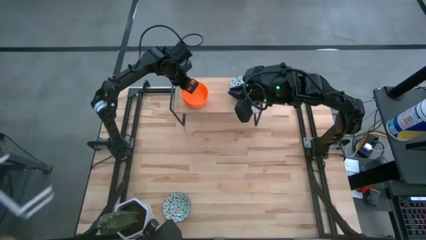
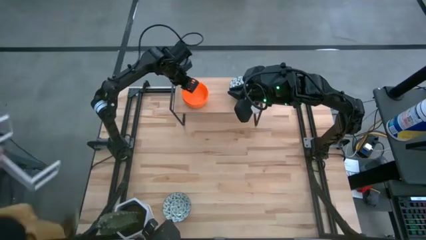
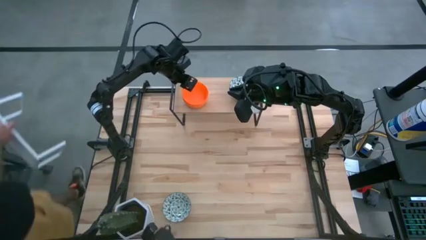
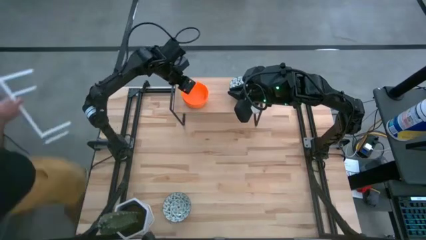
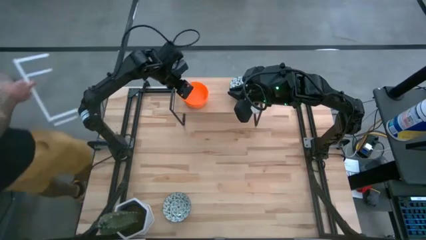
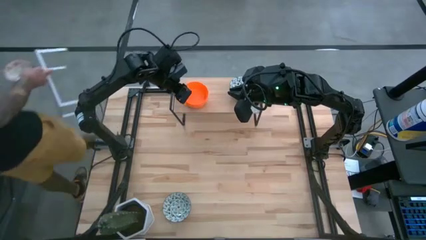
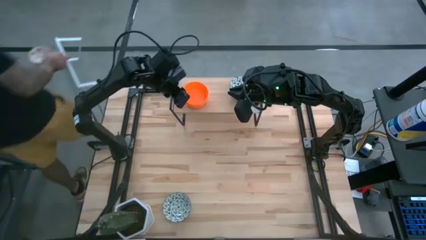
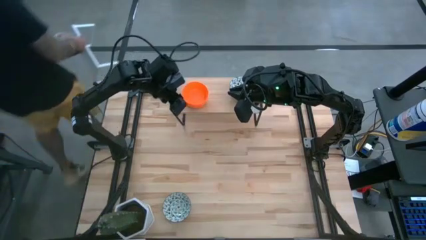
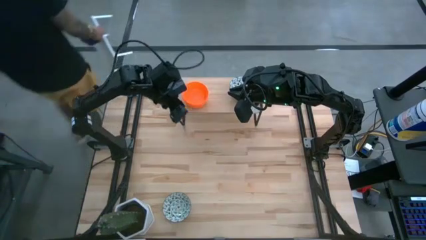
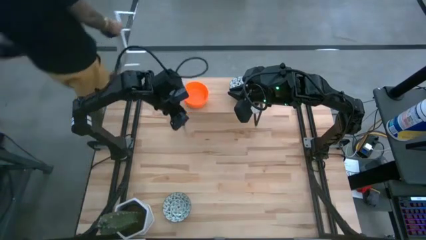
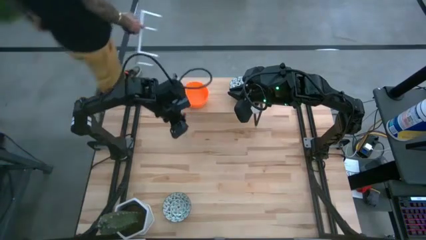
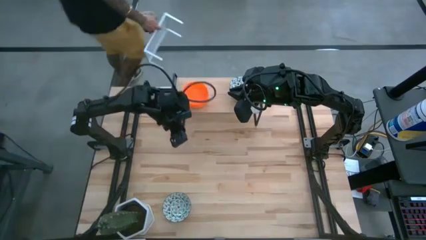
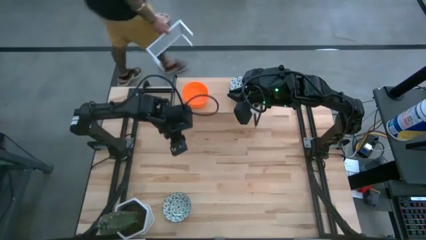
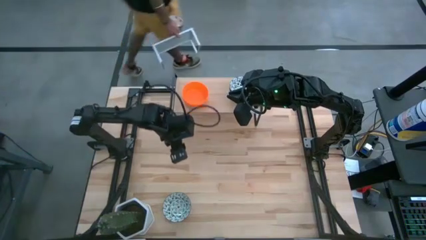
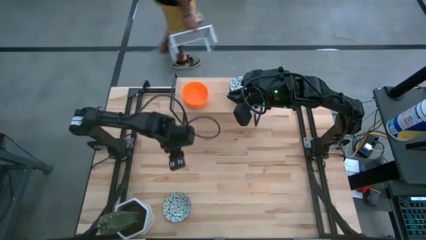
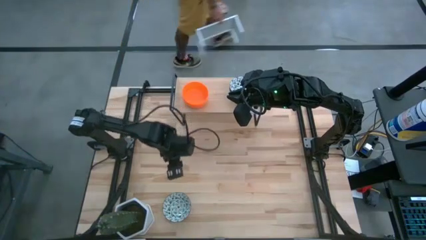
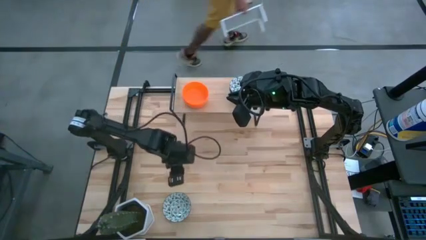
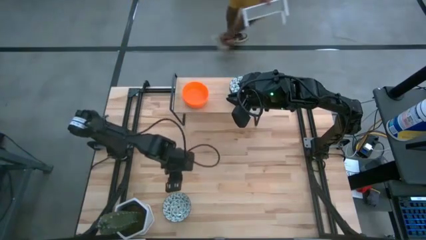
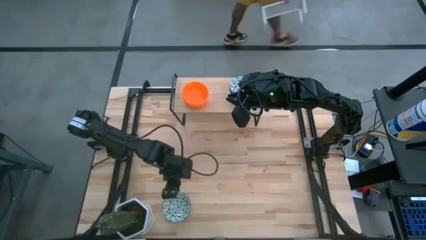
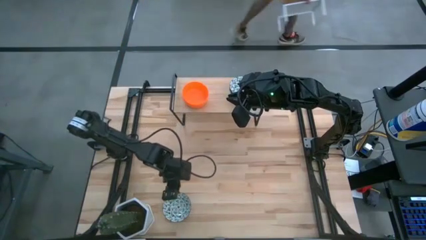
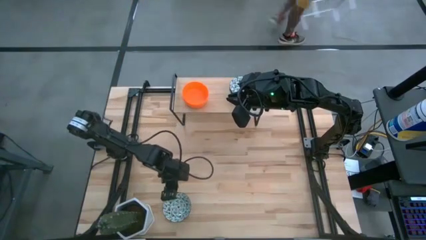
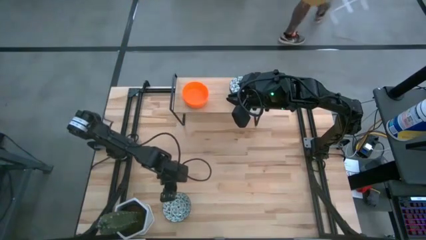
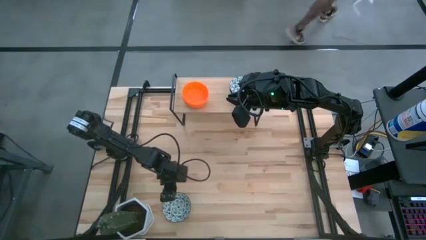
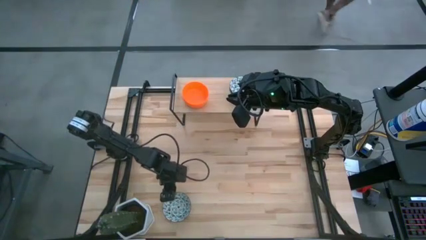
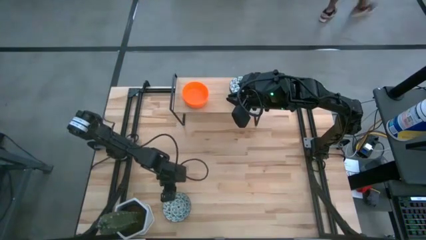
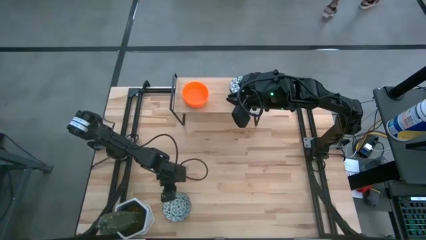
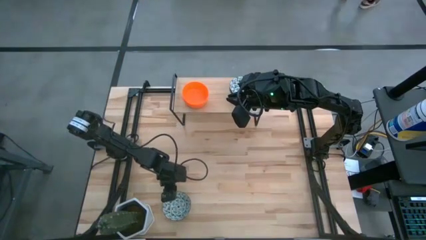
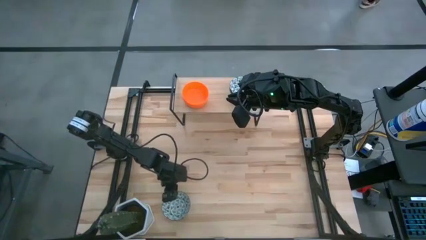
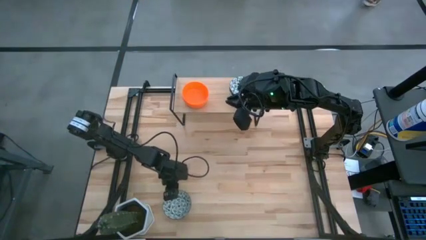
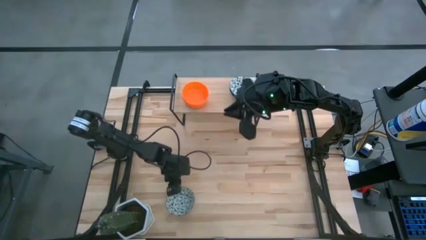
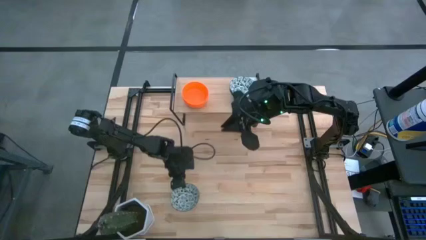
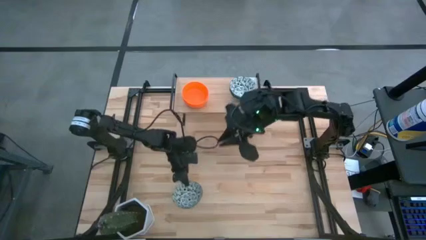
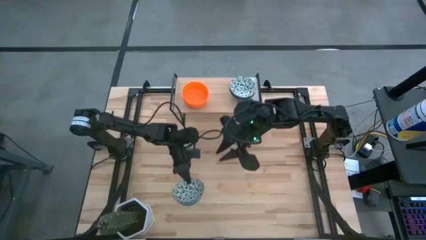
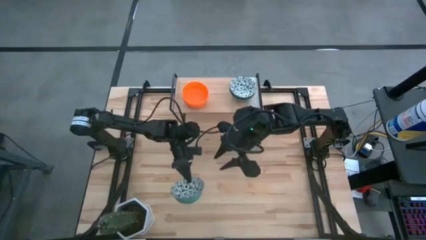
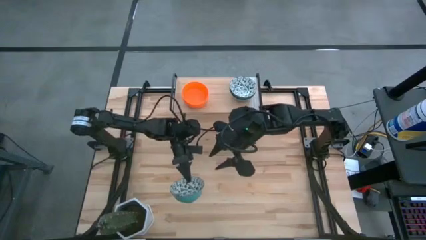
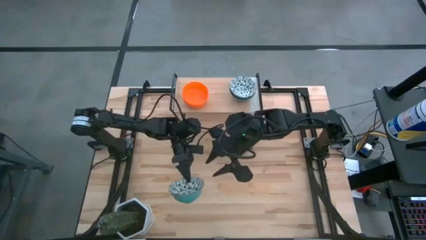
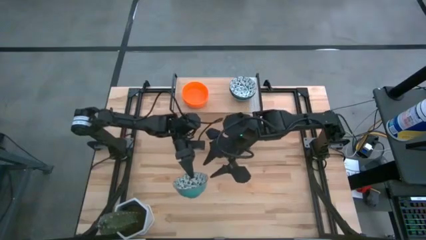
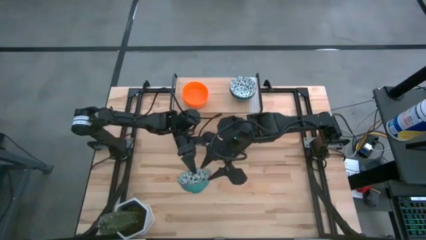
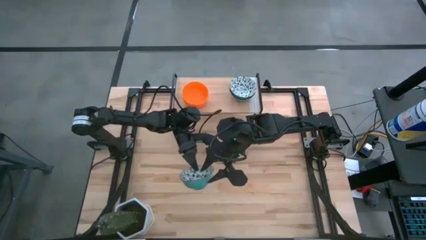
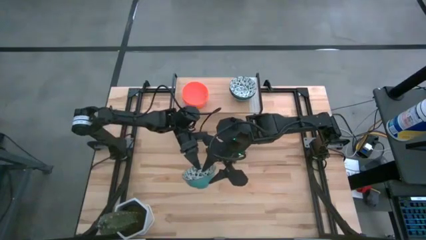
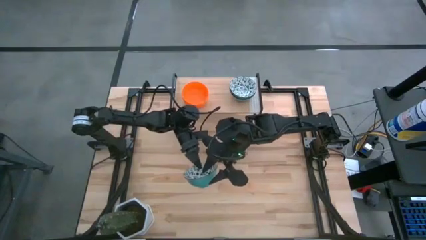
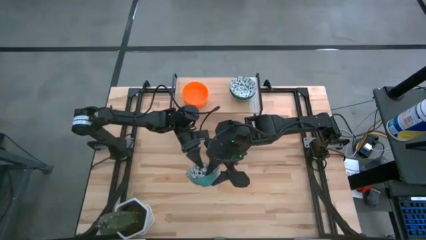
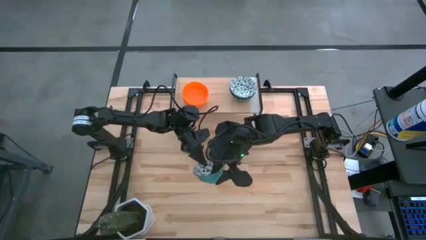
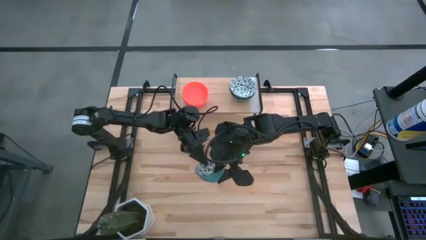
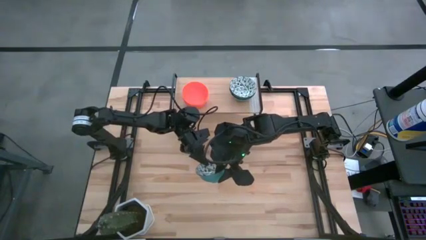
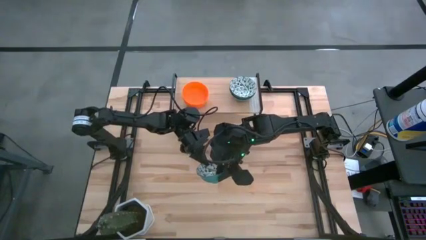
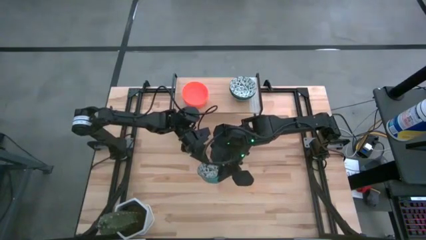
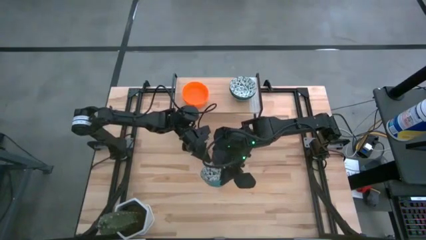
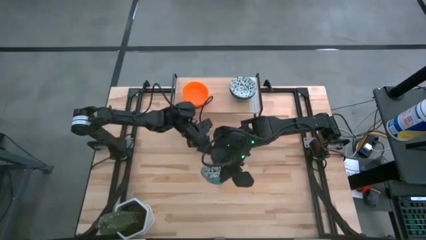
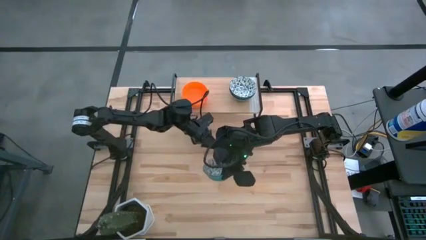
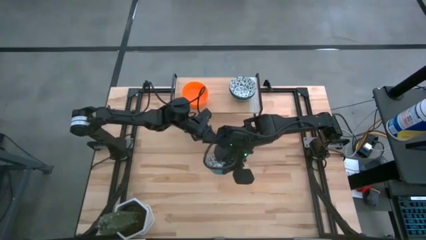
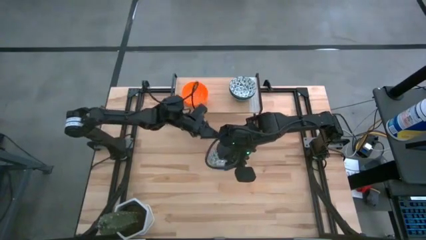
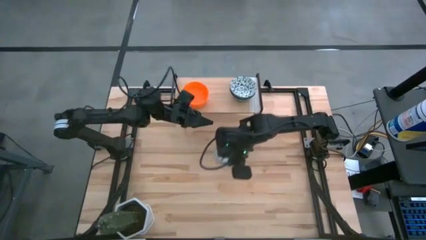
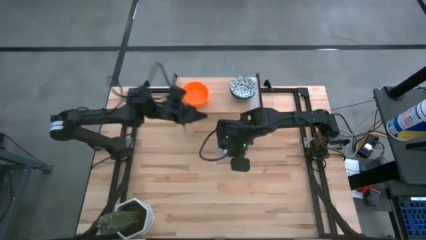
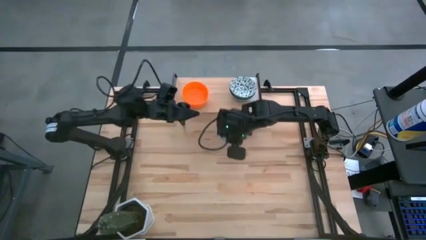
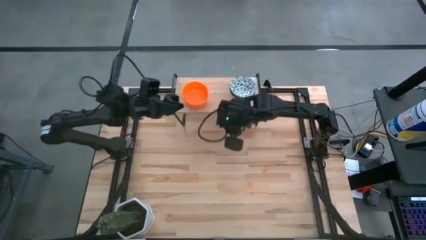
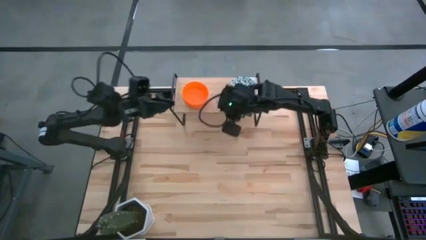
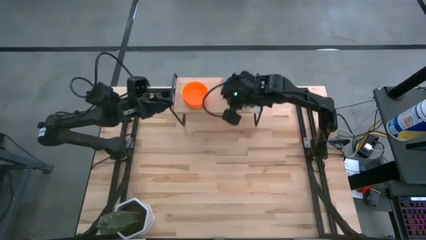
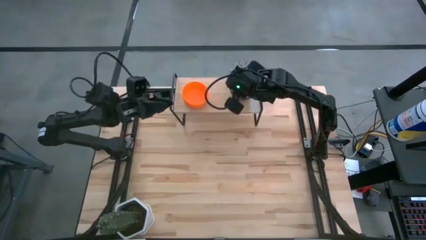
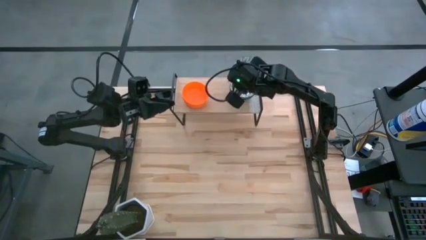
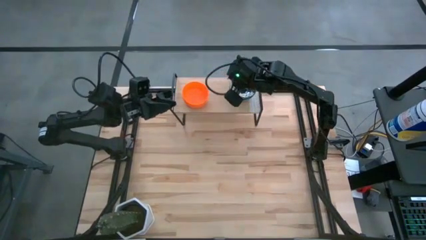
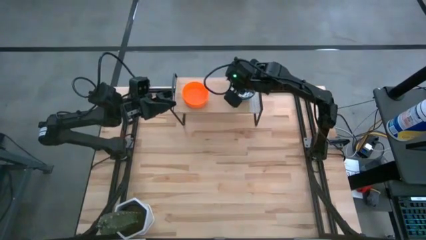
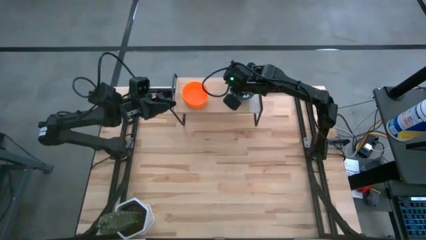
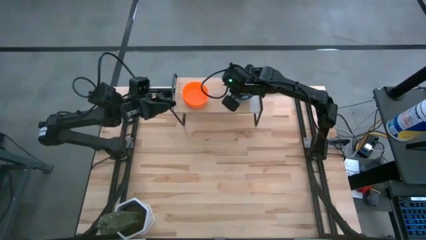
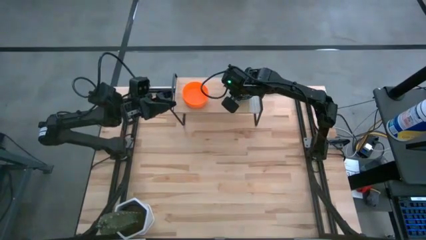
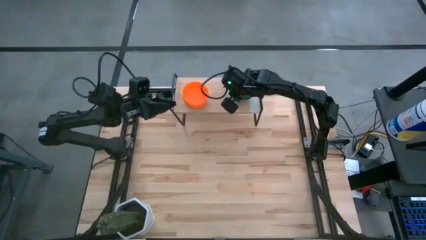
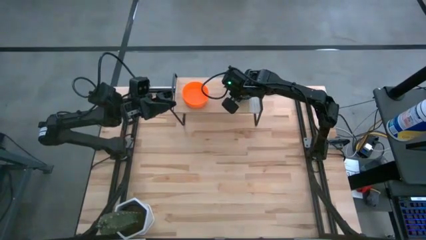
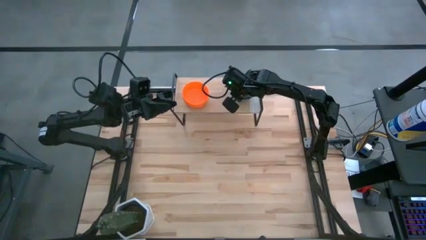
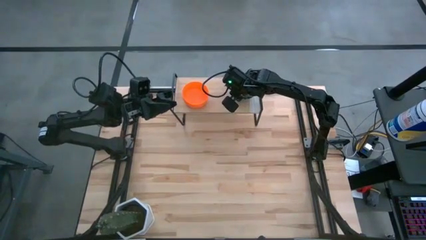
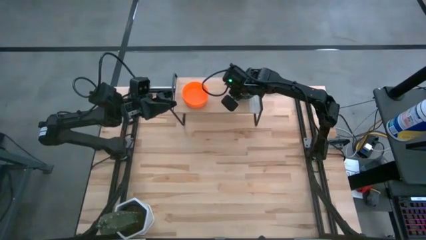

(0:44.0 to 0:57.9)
Task: Pick & Place Mini bowls
Stack the light blue patterned bowl on top of the light blue patterned bowls on the shelf
